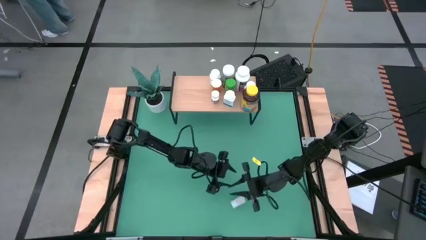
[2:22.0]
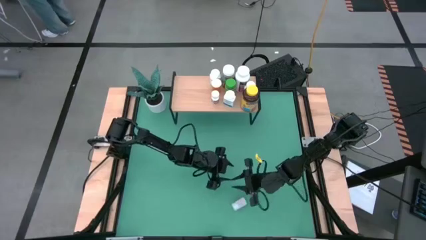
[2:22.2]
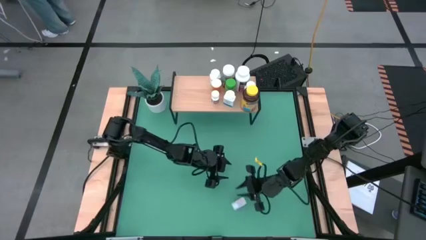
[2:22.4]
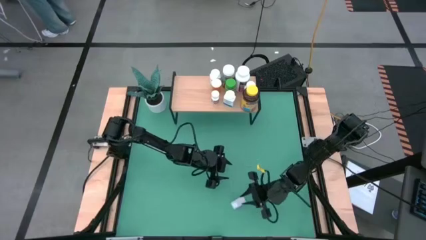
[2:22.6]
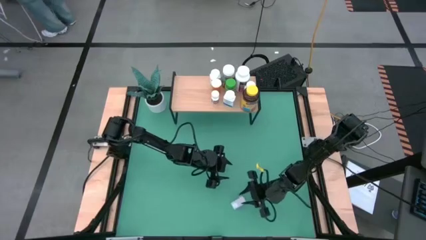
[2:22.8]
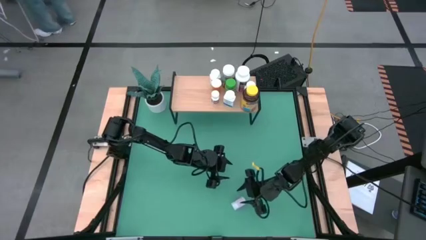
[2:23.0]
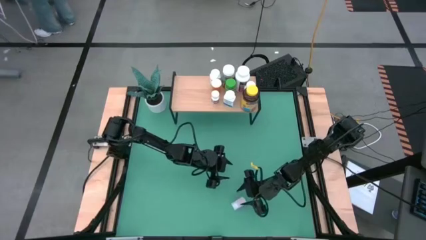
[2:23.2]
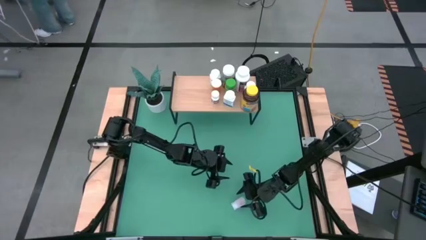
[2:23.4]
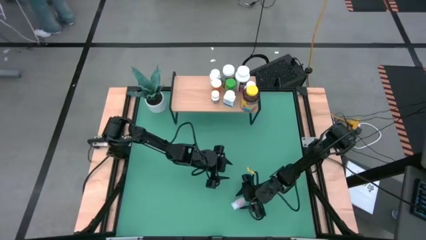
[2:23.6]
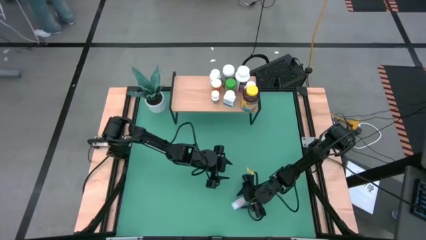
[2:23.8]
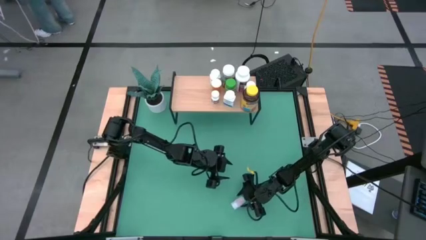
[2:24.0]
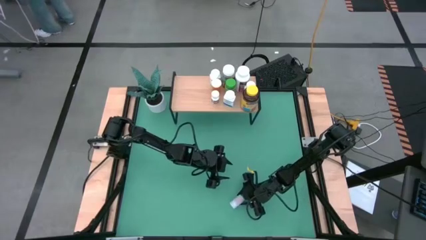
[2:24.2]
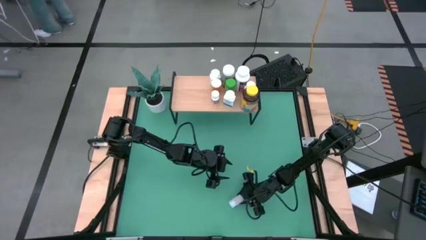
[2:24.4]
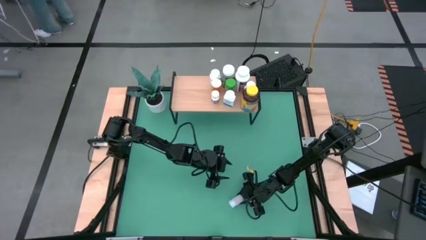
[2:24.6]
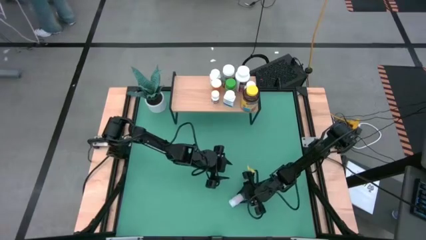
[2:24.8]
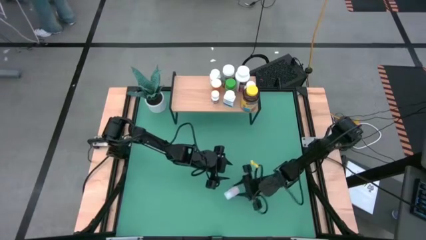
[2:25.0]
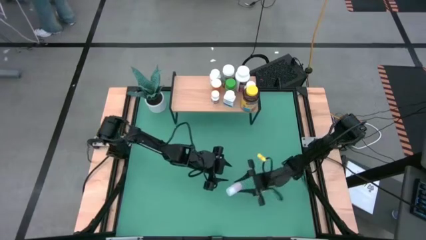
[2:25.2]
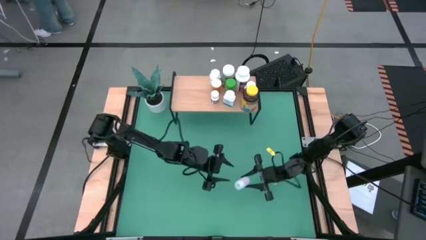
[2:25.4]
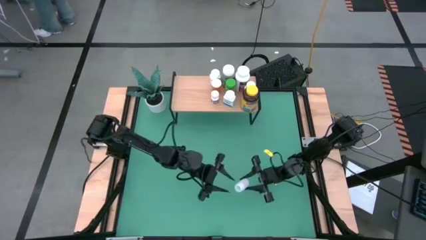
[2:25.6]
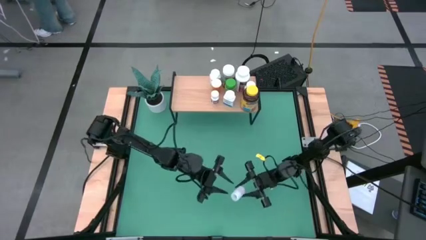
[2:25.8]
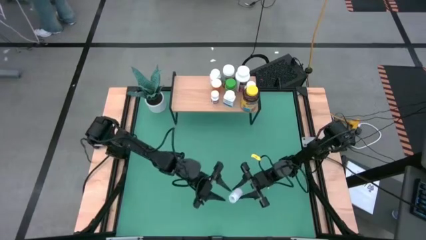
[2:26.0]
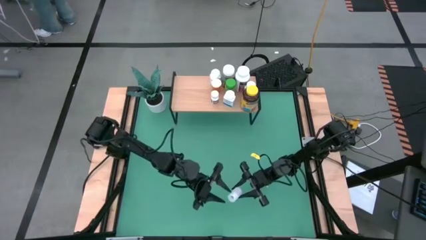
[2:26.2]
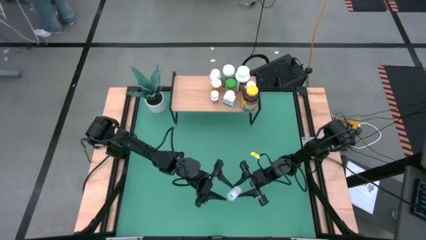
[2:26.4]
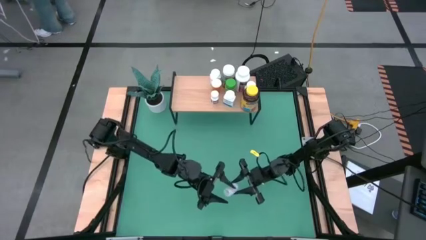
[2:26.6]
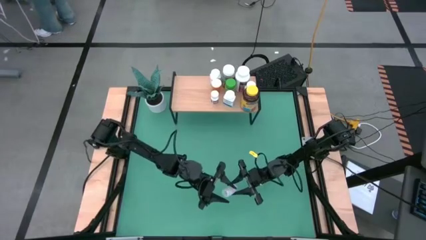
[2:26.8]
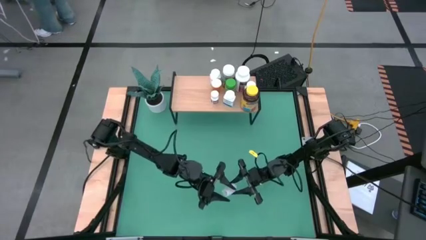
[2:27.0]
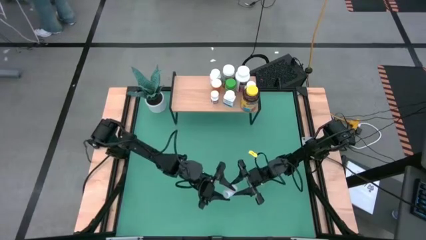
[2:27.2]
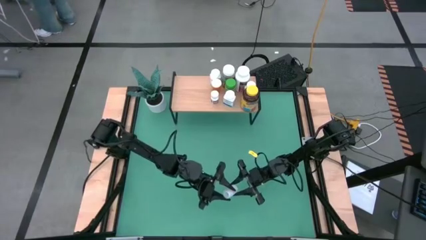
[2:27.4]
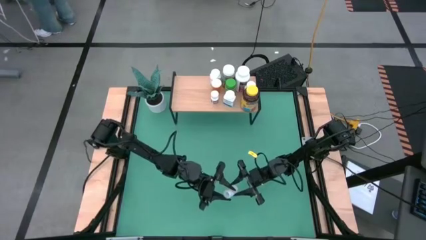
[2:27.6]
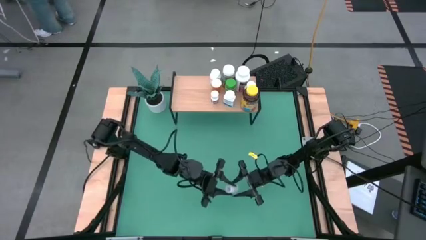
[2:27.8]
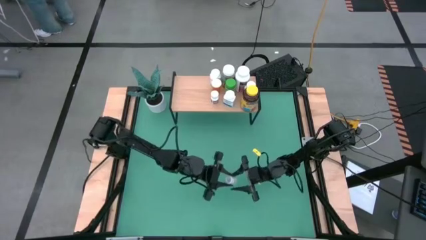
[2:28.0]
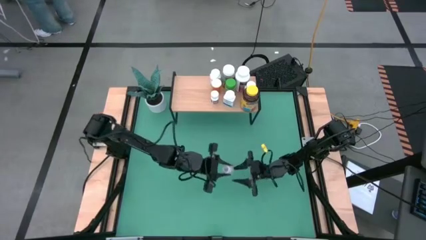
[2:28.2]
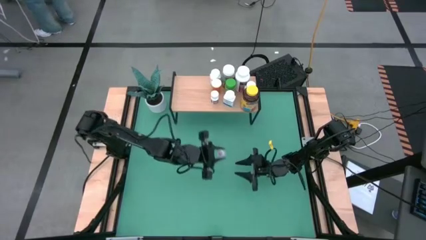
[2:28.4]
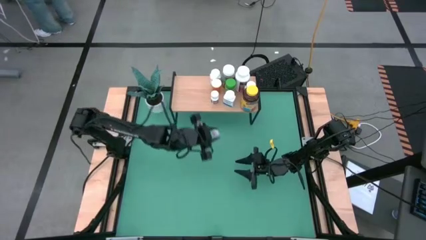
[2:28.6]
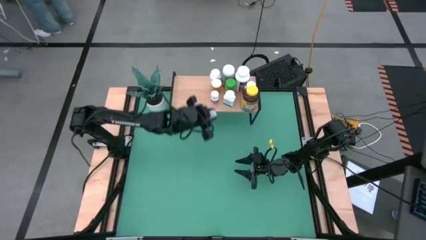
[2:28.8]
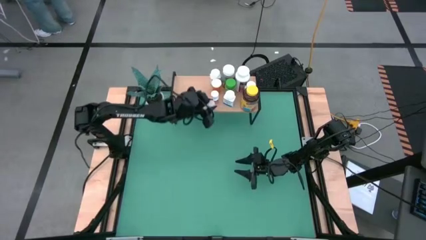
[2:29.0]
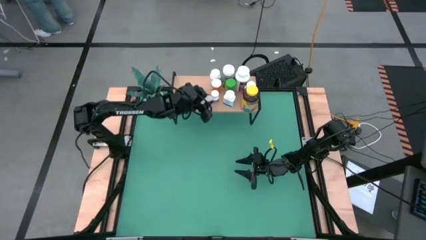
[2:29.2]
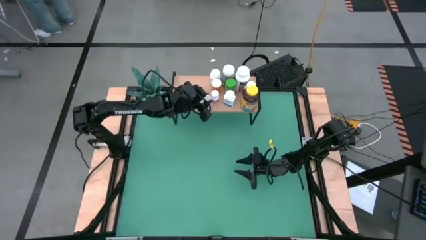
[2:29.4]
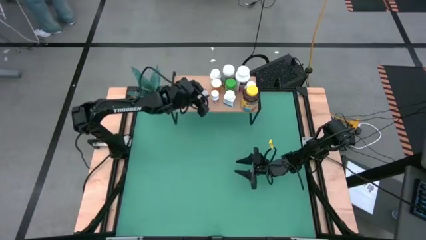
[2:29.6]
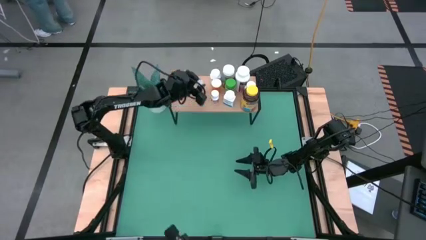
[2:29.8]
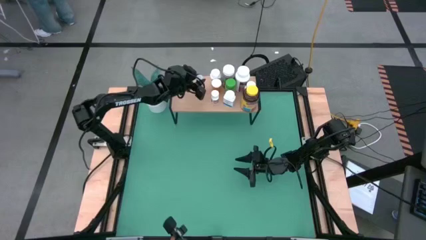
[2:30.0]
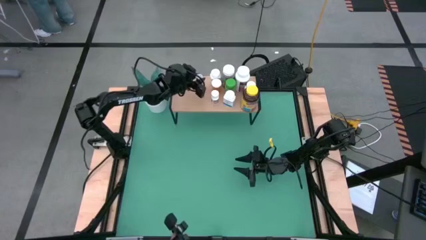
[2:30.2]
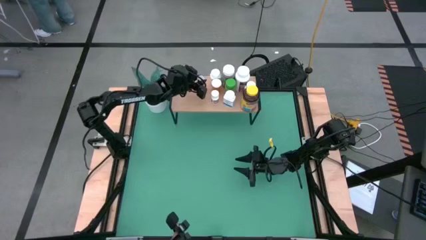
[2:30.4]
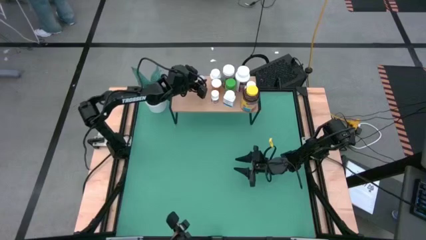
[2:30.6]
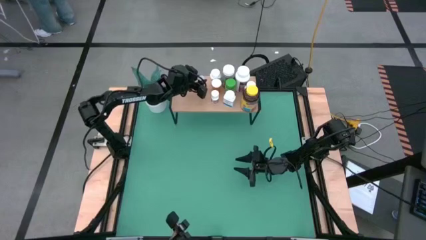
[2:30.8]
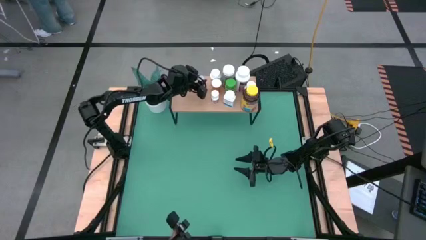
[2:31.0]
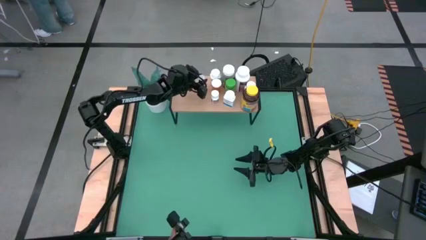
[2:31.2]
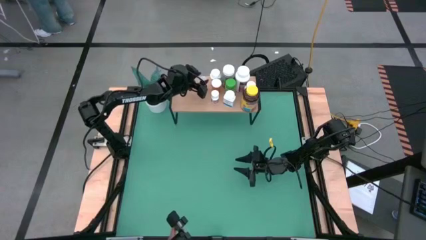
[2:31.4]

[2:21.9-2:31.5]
Task: Pick and place medicine bottles onto shelf by color
Put the transparent pill bottle on the shelf

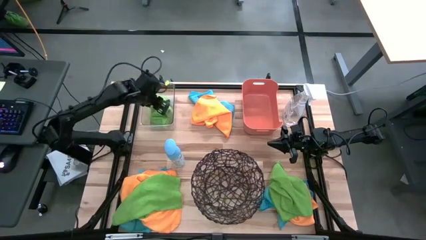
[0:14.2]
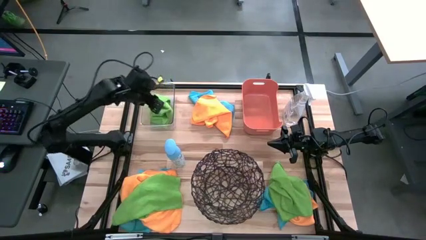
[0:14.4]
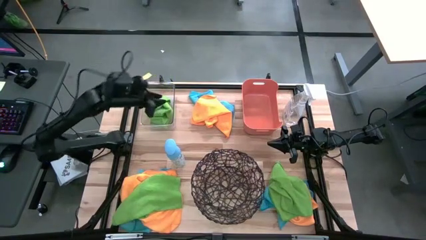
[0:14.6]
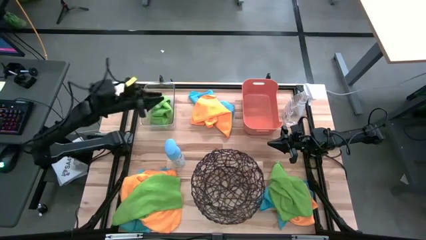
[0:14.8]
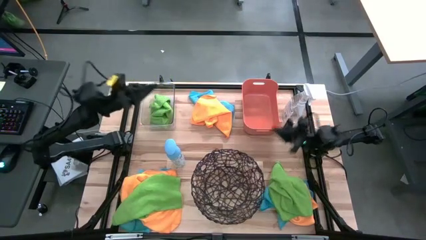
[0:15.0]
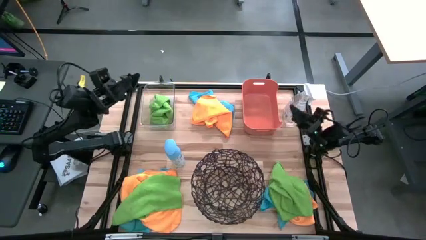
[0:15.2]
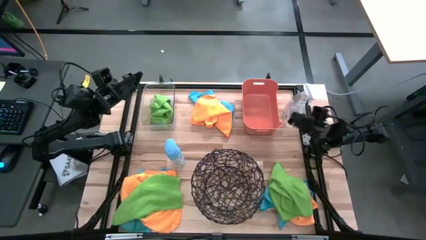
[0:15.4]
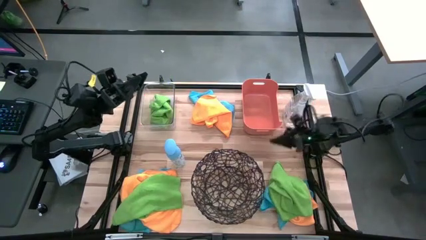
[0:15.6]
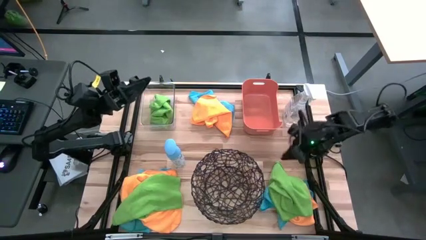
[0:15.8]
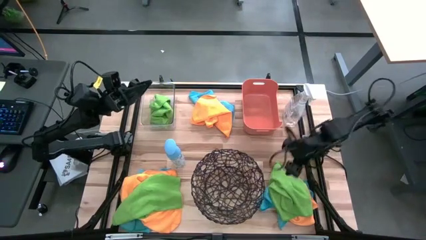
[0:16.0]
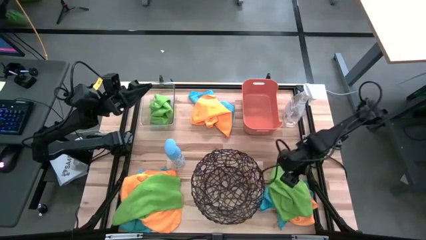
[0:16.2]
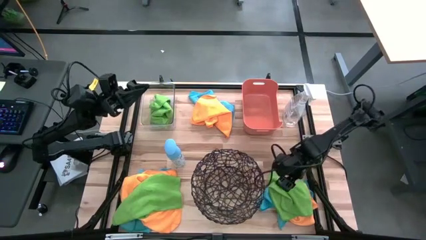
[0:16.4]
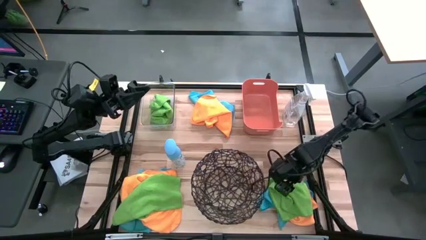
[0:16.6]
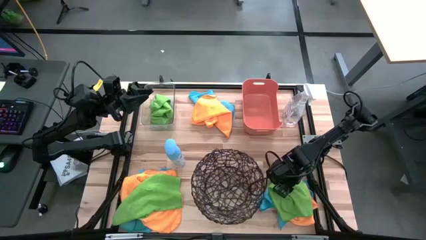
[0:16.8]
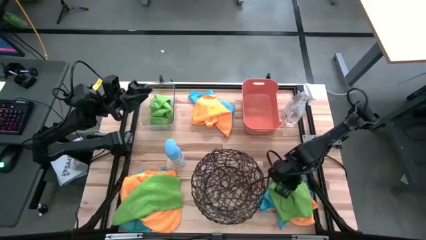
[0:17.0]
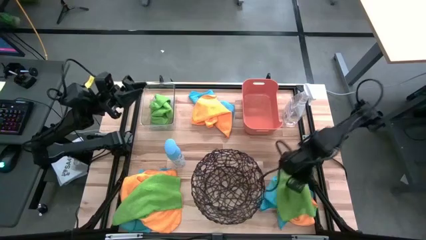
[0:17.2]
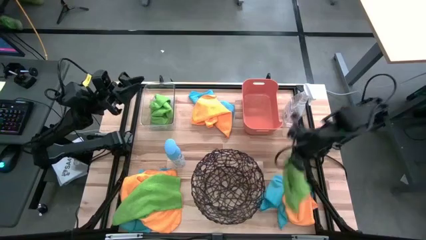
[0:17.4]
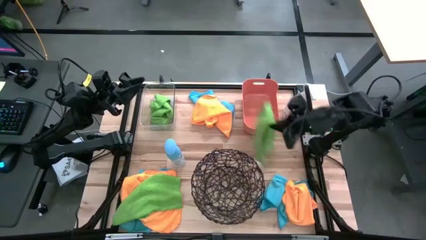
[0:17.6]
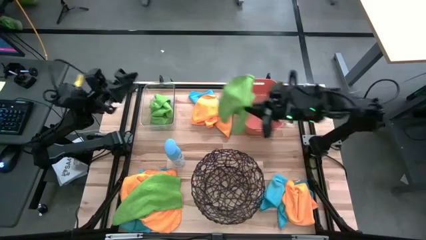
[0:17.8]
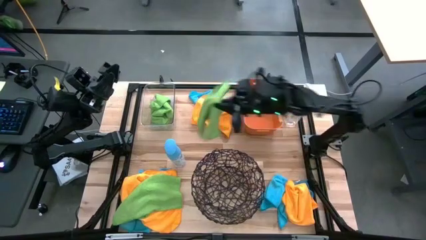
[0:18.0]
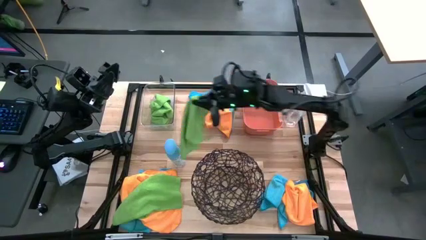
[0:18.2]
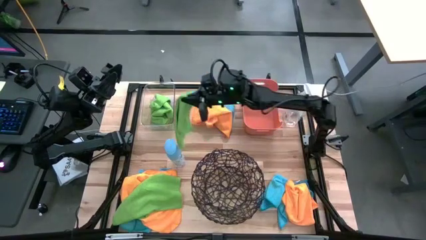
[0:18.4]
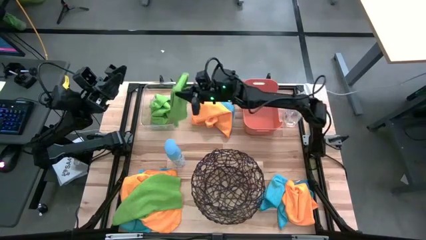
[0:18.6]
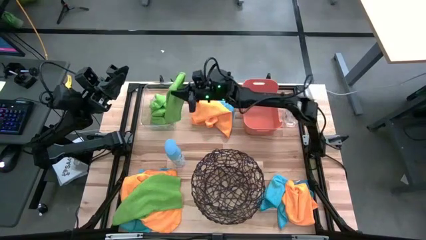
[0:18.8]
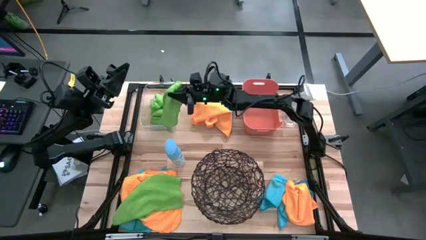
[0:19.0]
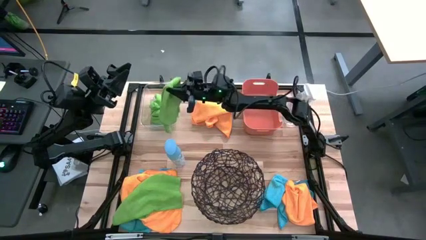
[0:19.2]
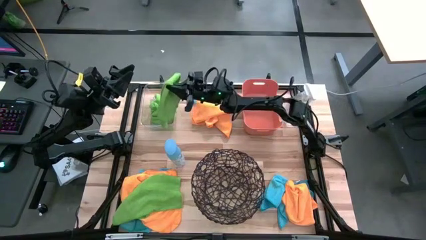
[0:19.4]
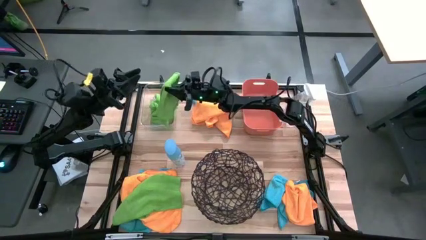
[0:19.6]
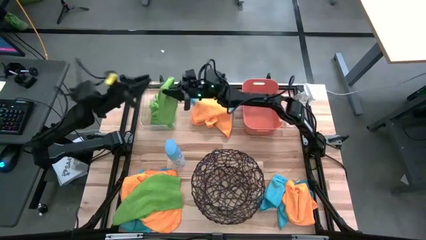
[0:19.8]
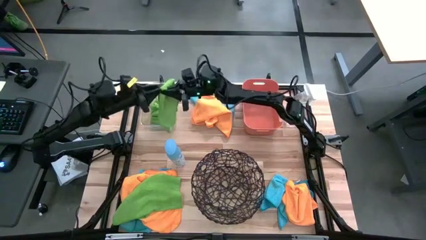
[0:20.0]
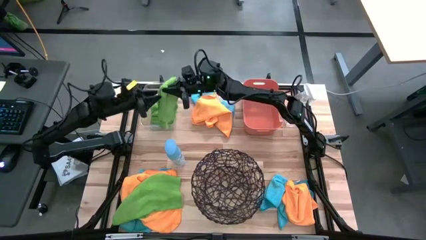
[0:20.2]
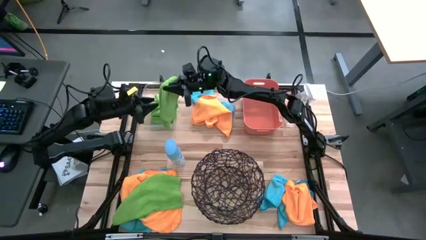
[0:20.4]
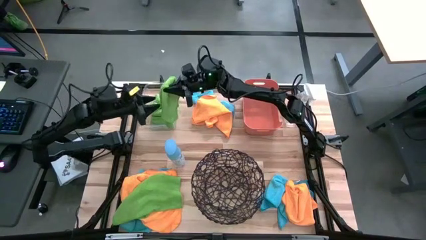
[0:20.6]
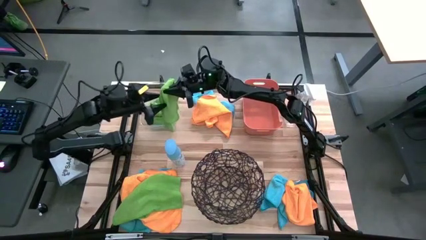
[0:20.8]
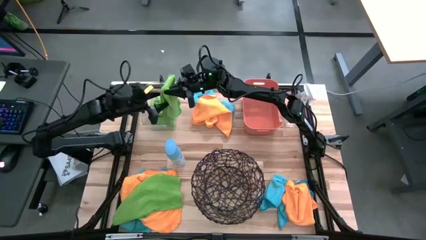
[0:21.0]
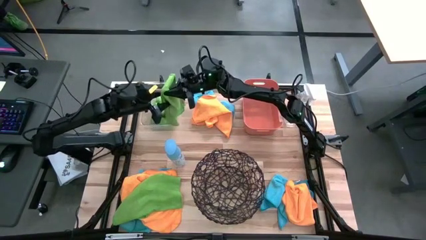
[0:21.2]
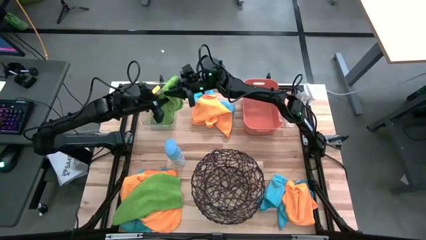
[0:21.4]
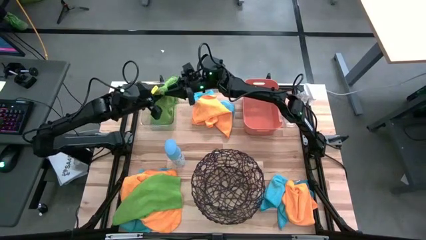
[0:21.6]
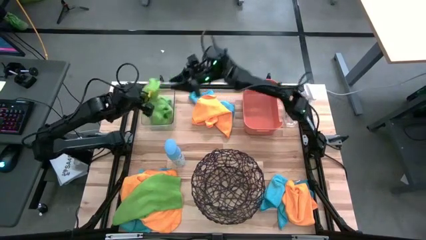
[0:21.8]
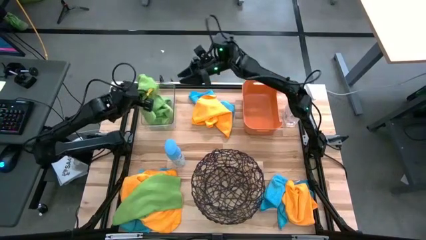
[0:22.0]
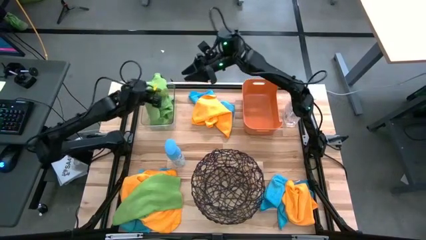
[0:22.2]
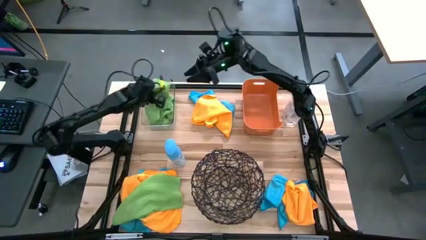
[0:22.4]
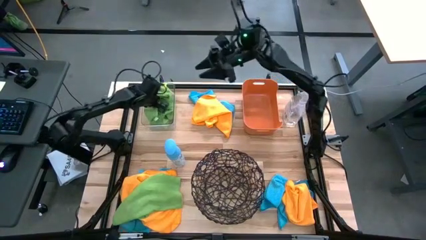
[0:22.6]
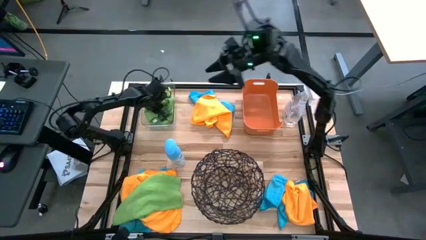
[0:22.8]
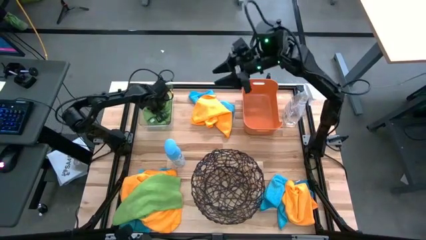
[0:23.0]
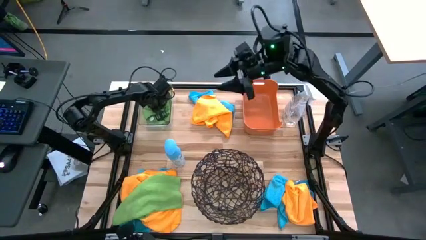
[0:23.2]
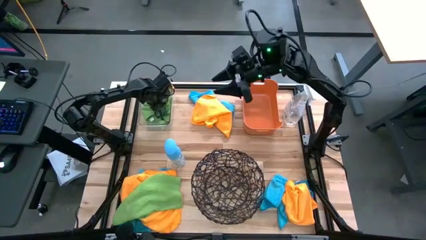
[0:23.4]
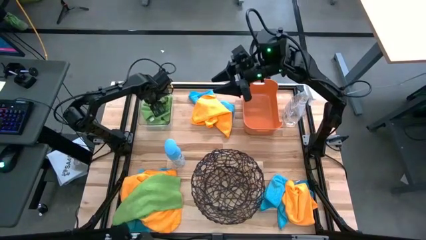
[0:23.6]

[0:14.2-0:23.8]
Task: Sort microfiber towel by color & place in baskets
Put the right green microfiber cloth into the transparent bin
